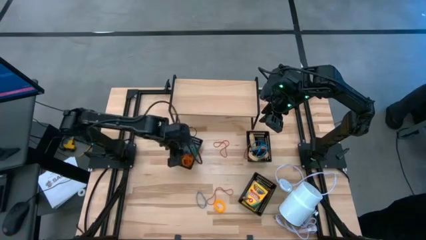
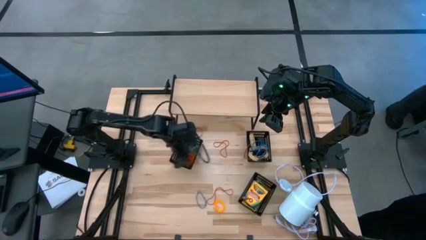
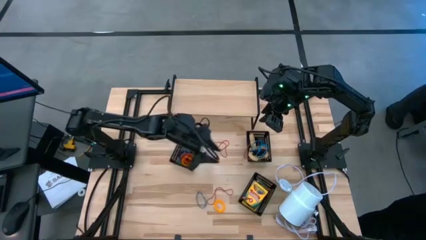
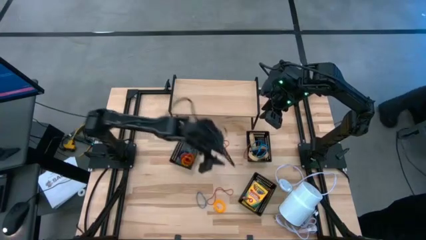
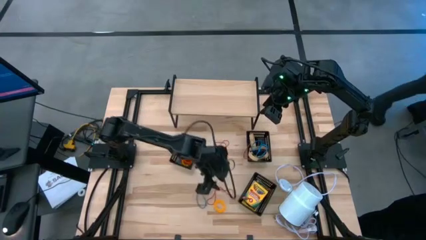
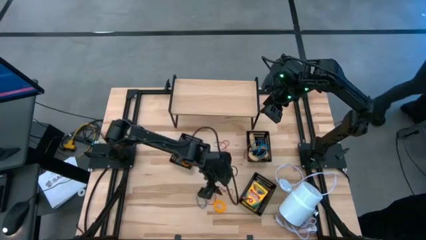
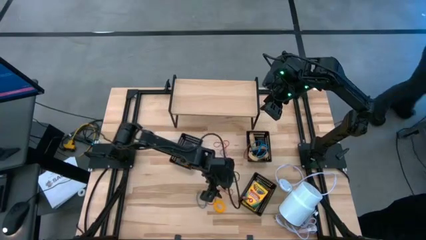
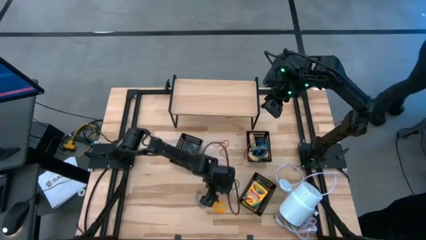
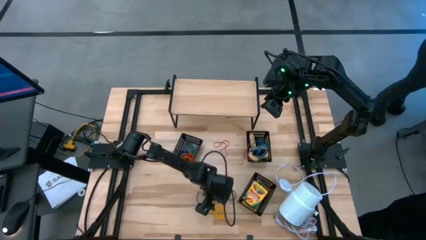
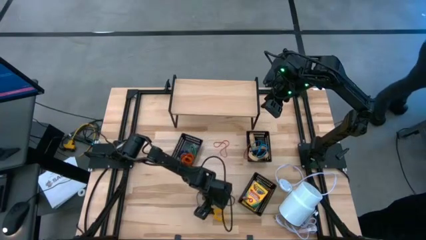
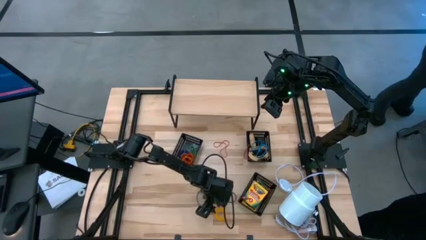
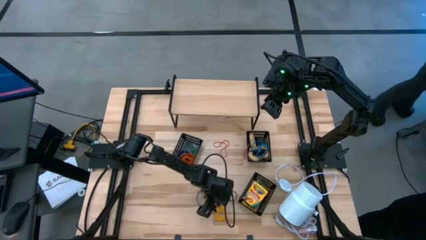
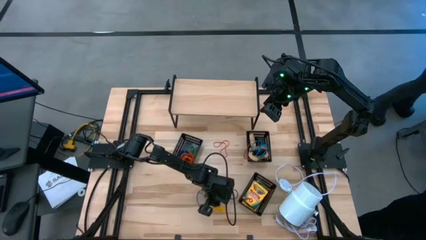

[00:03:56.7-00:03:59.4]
Task: Pick & Place Office Desk Supplies
Put the yellow spring keychain into the left black bin

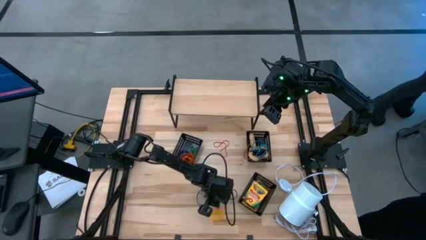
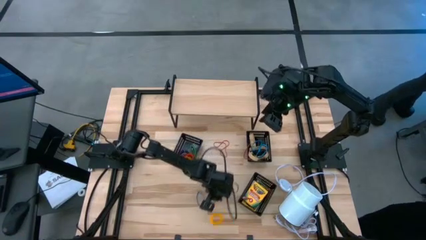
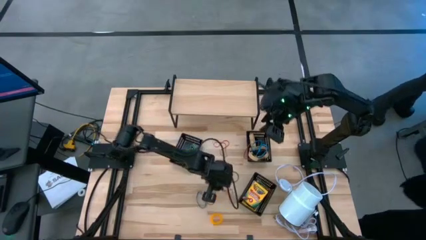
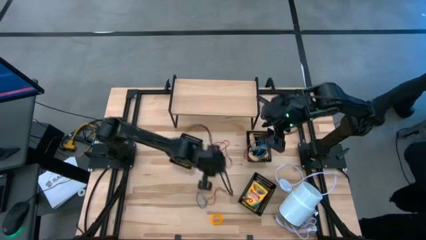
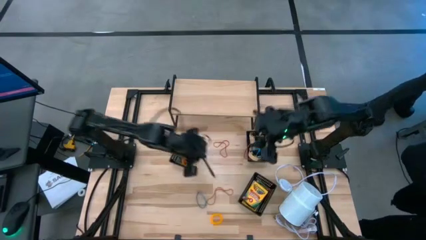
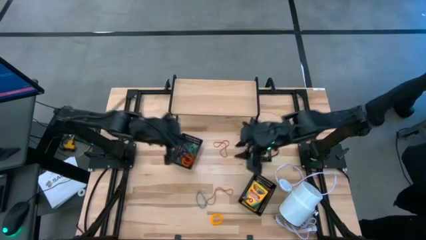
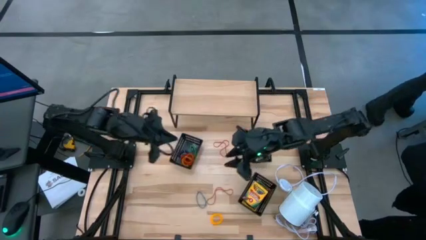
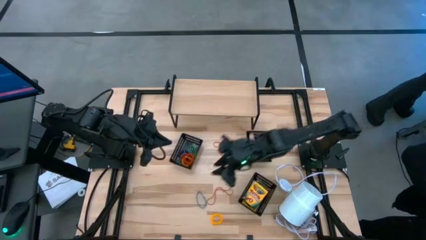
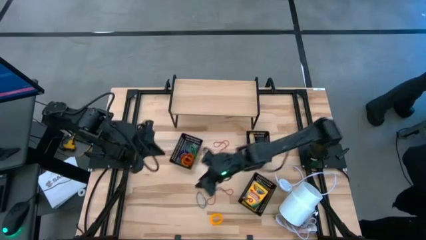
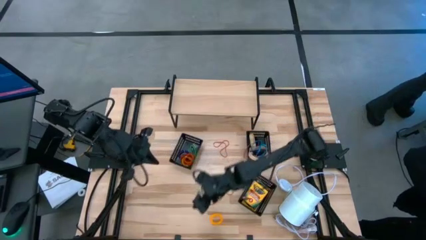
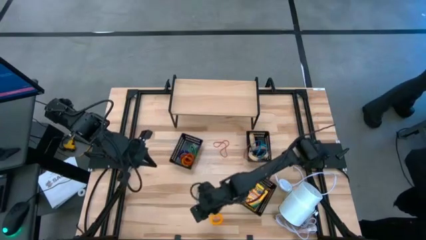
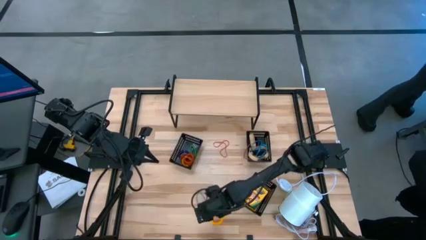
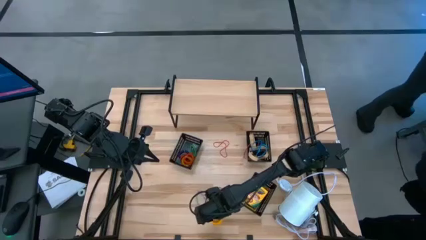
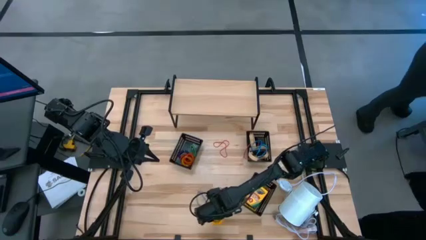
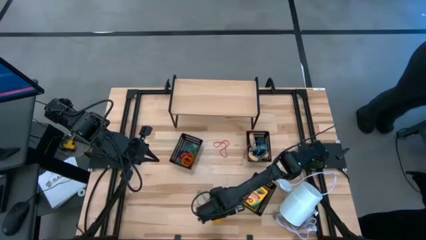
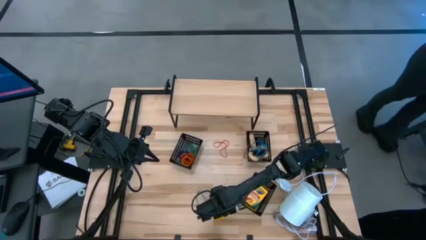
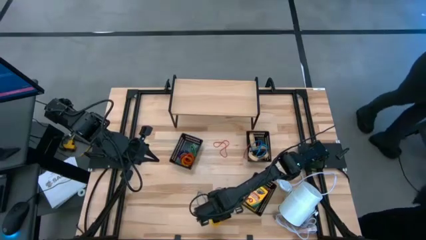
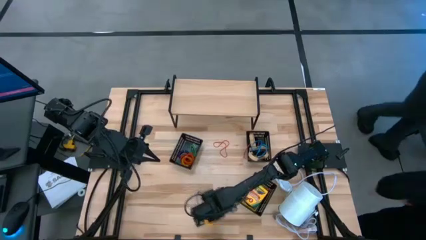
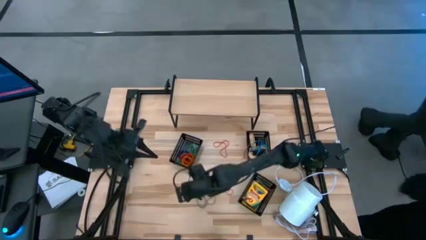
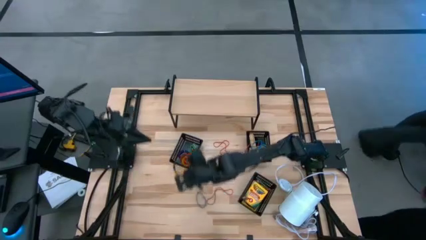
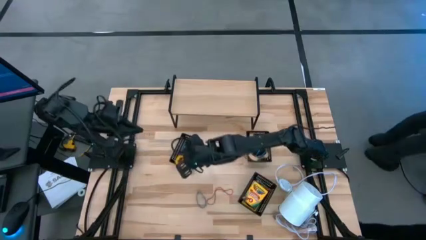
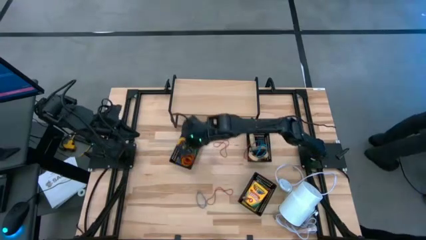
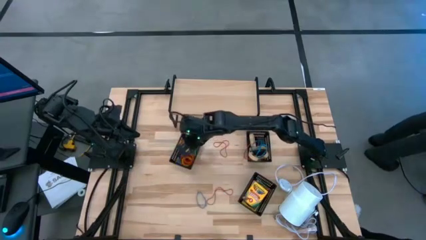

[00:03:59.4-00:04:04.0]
Put the yellow spring keychain into the left black bin

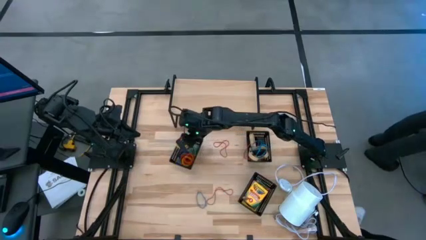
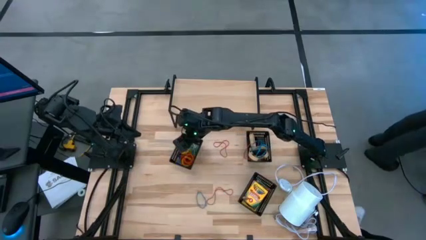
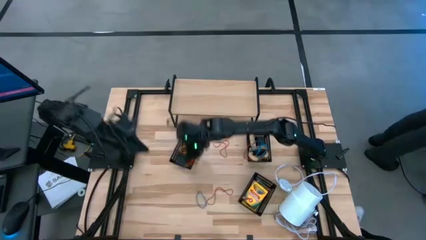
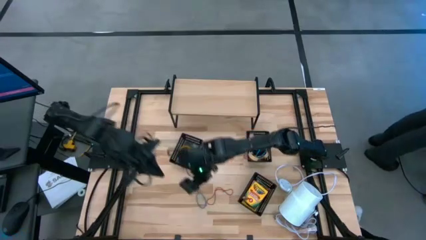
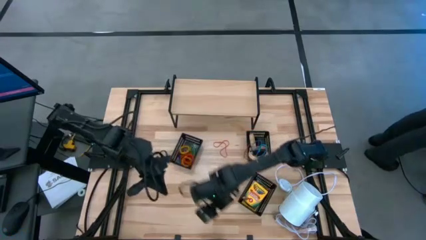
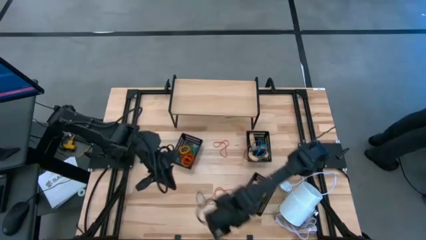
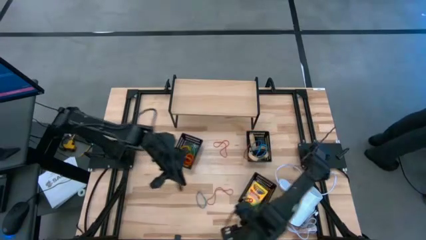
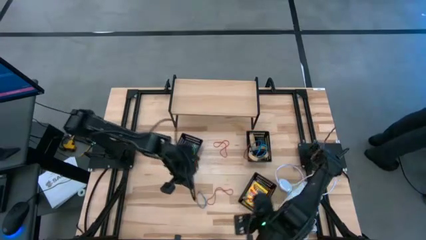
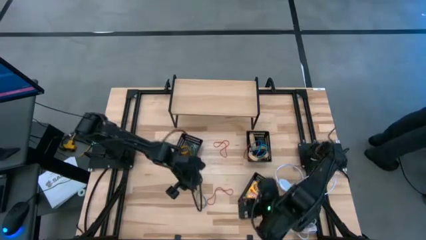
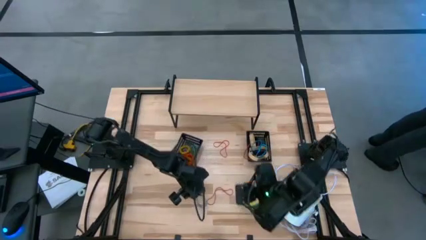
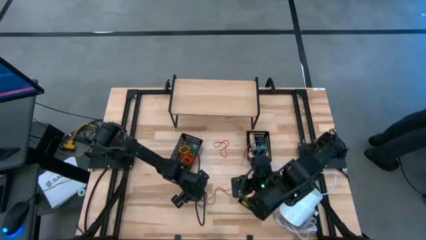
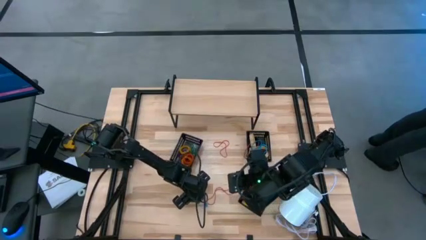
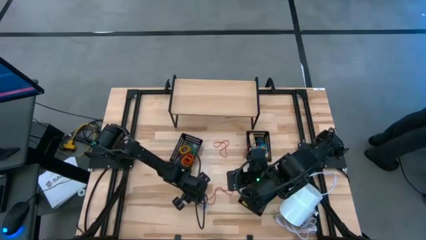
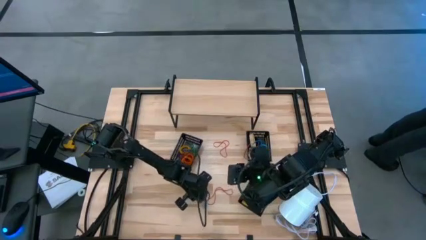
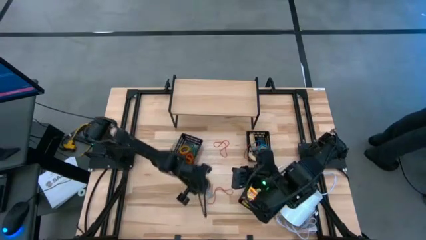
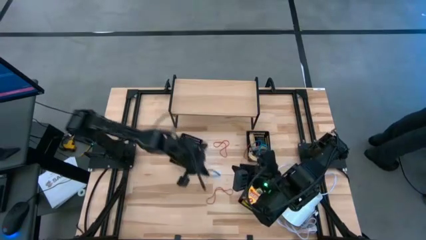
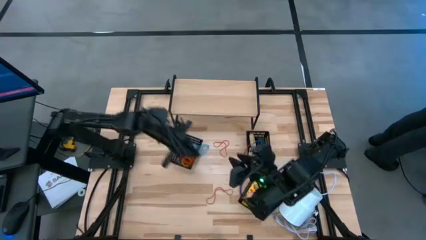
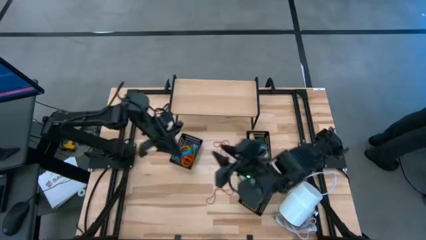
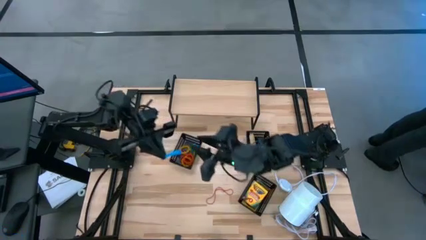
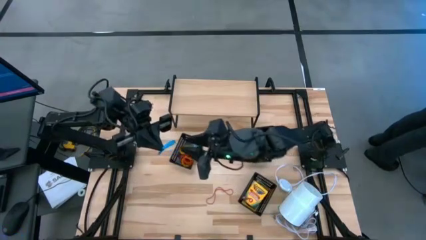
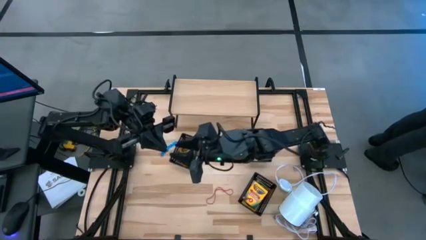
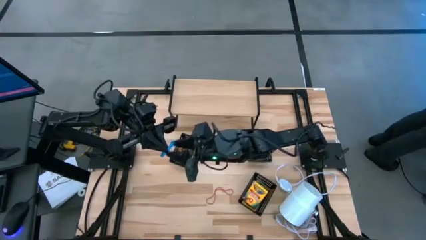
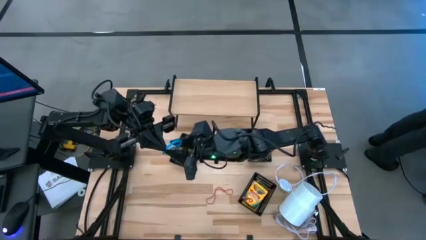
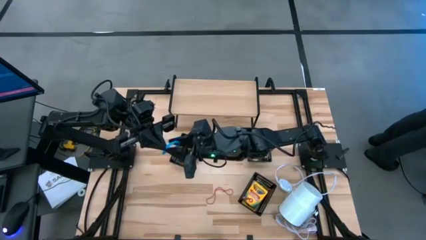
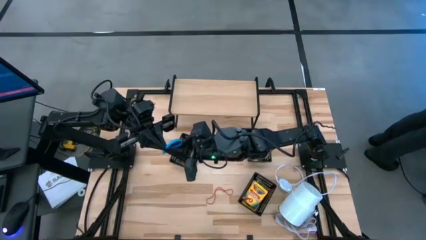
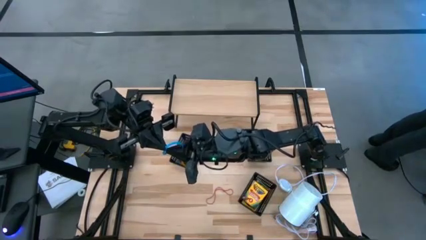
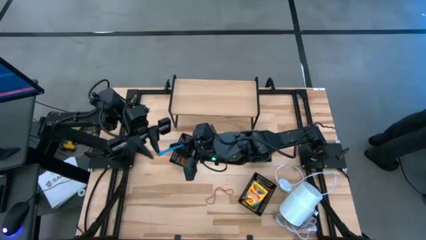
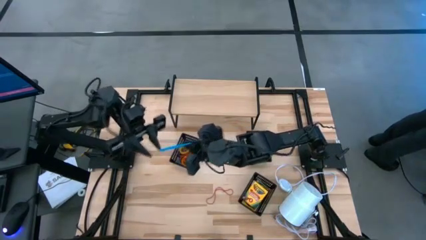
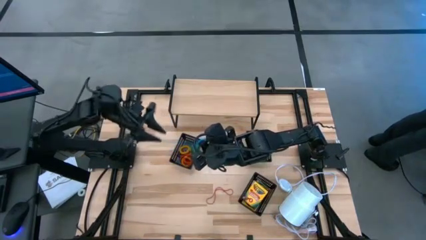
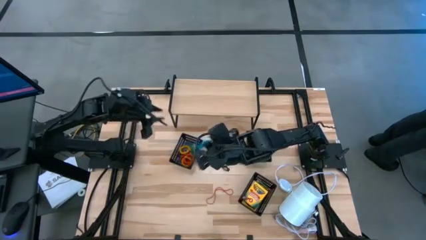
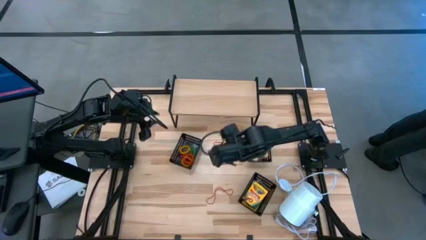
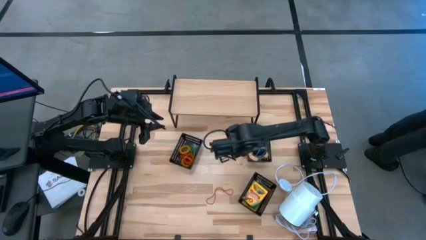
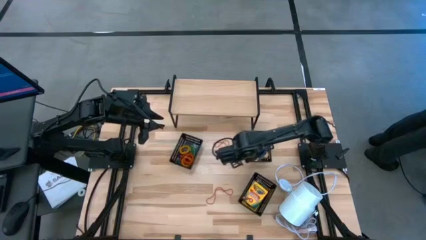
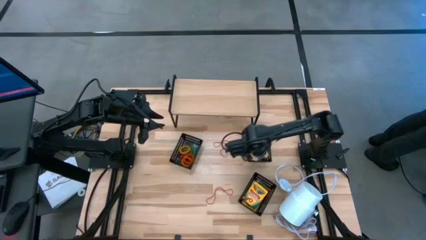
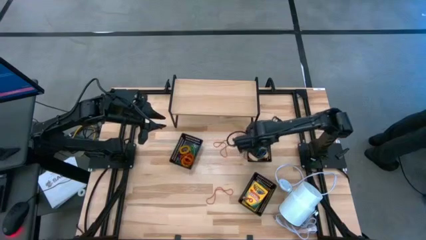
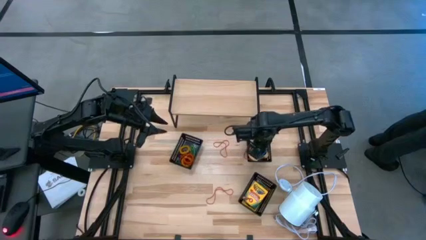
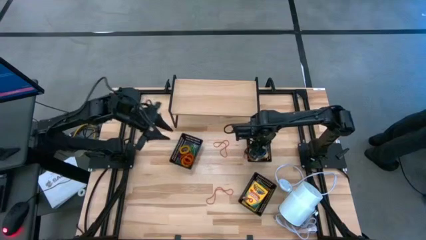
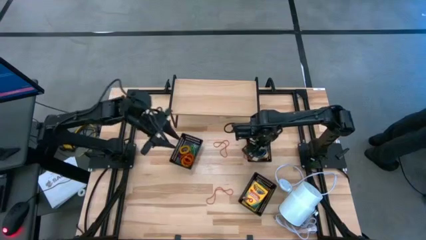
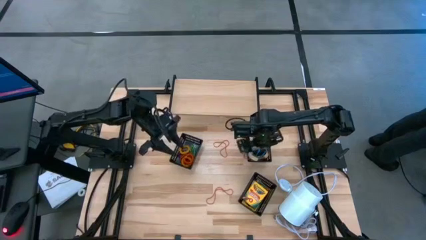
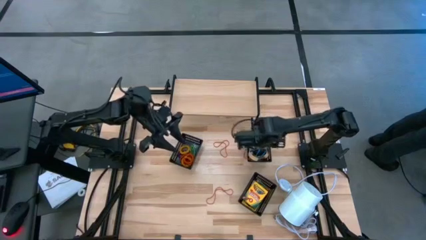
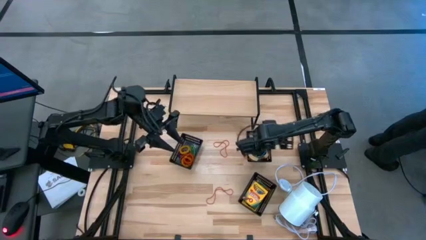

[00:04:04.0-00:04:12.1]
Put the blue rubber band into the top right black bin

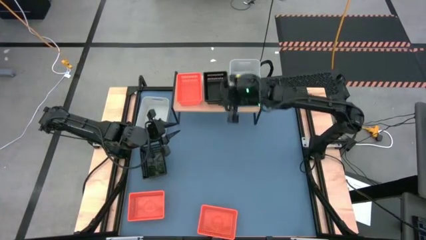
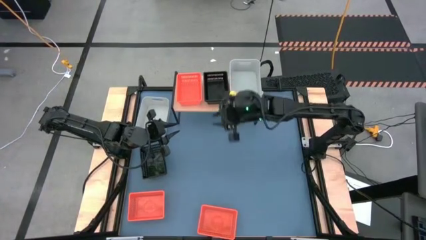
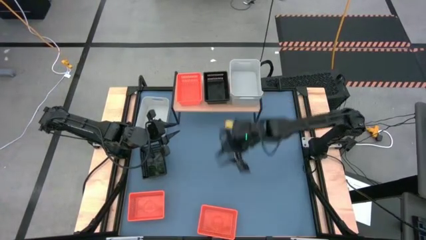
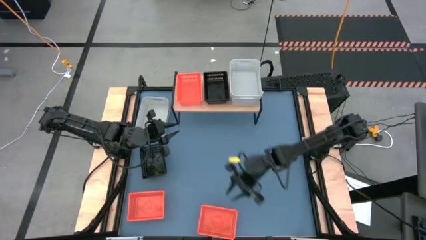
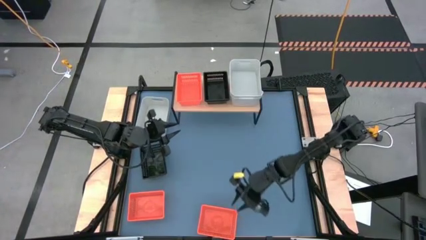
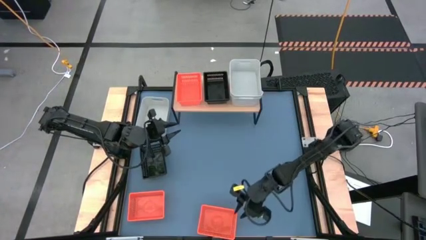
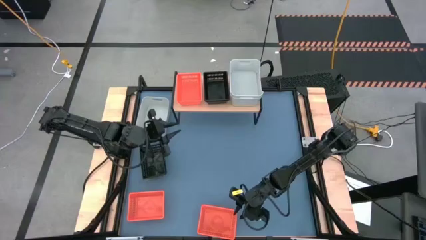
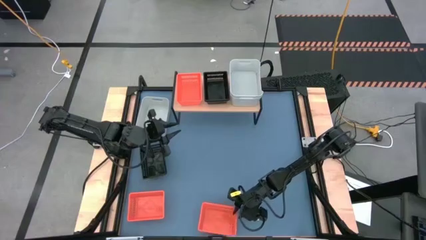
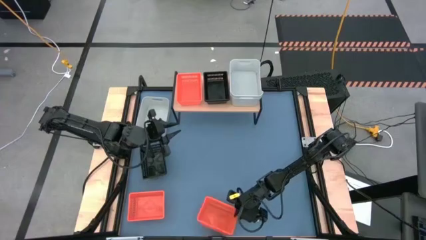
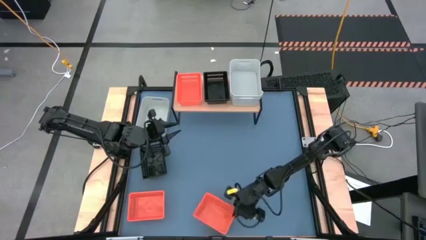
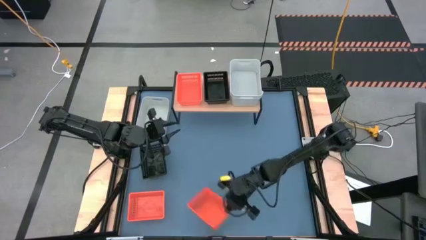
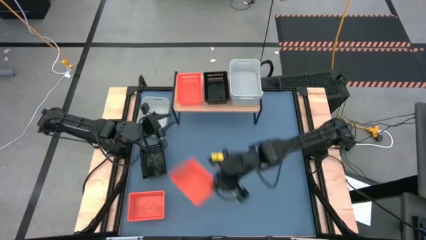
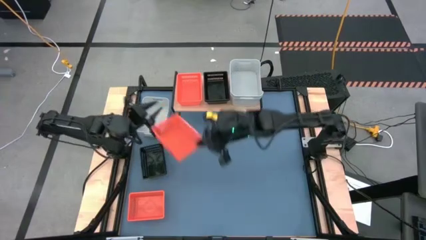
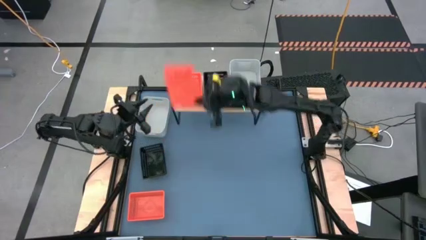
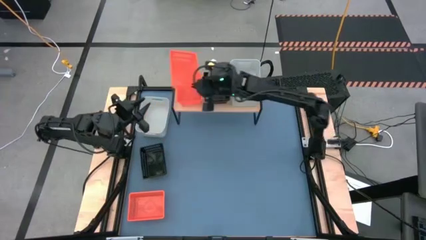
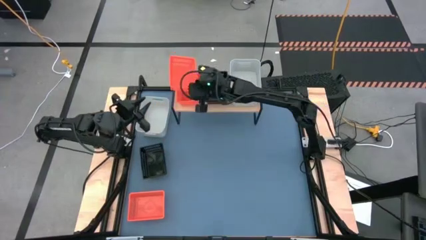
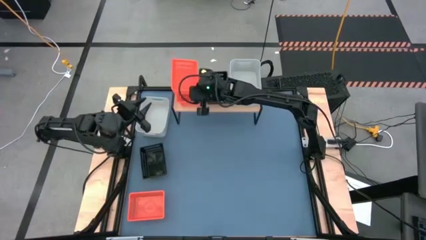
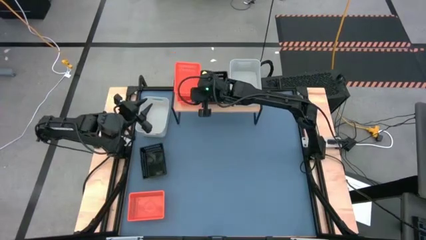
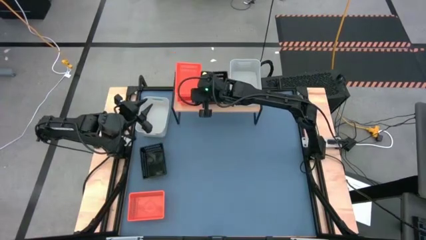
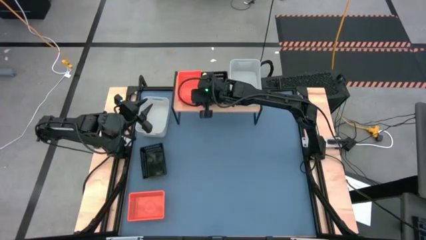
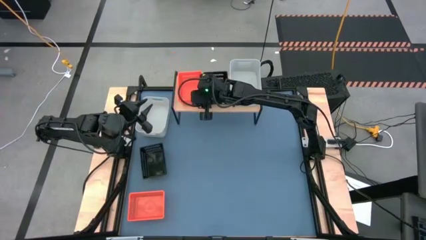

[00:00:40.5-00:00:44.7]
Task: Stack baskets on shelf by color
Stack the right orange bin on top of the other orange bin on the shelf
